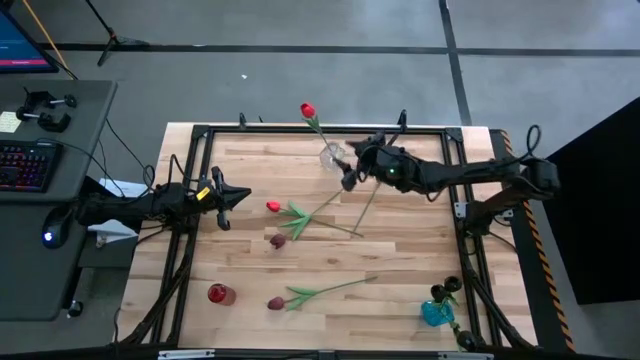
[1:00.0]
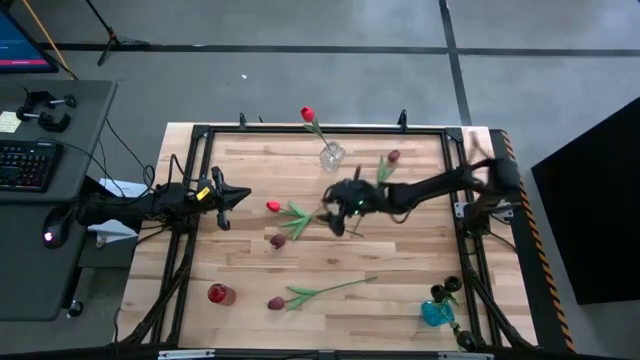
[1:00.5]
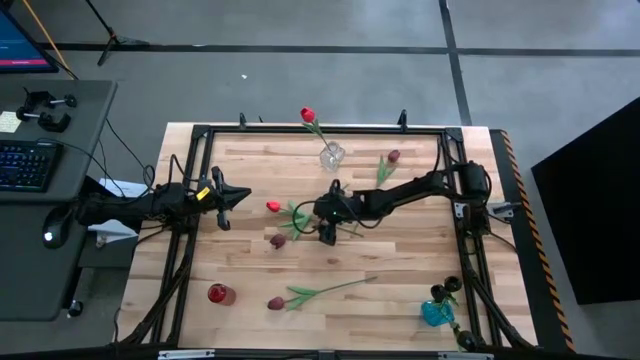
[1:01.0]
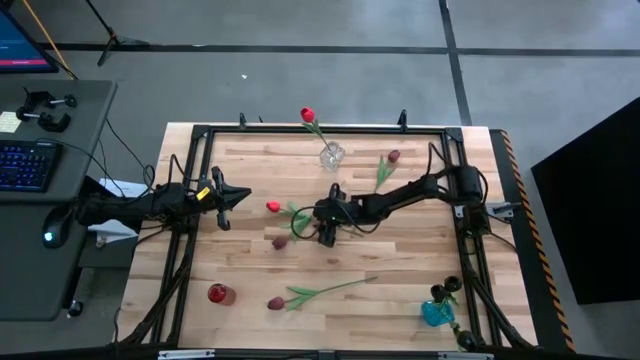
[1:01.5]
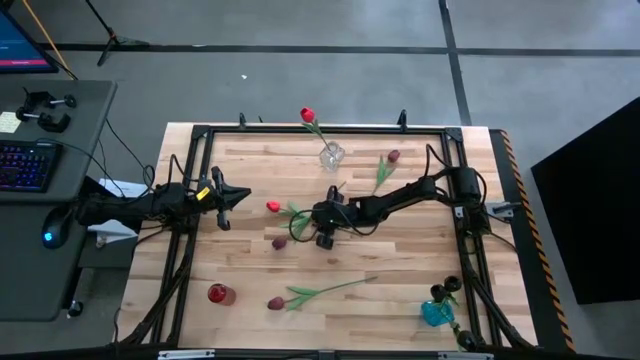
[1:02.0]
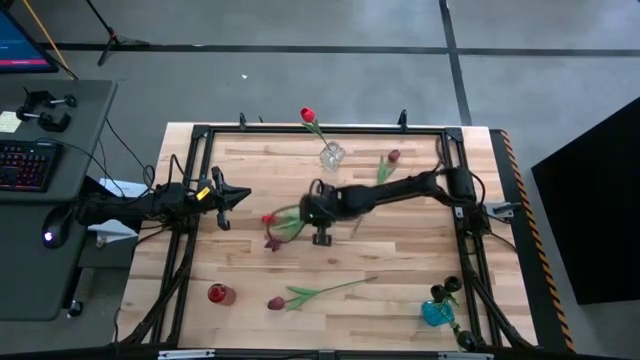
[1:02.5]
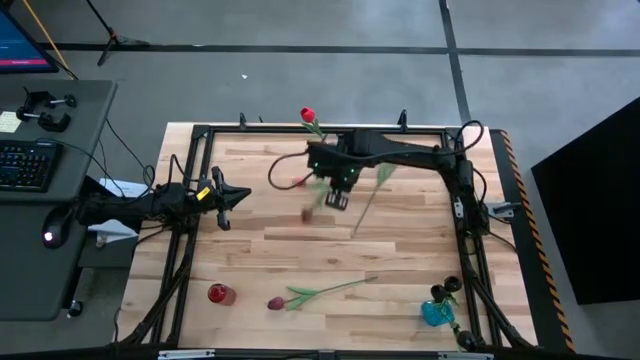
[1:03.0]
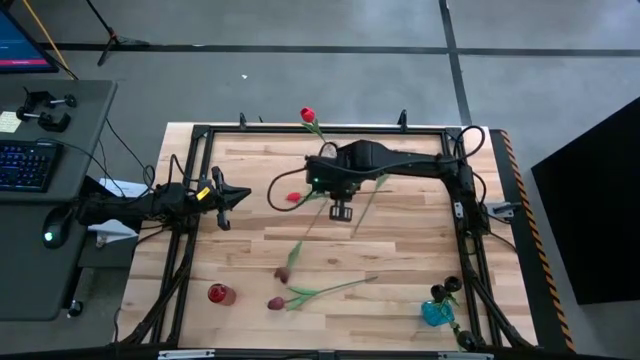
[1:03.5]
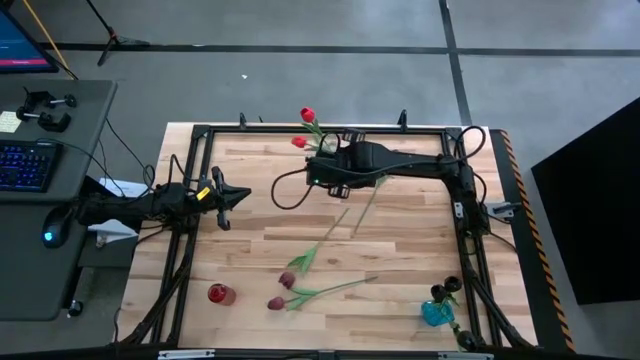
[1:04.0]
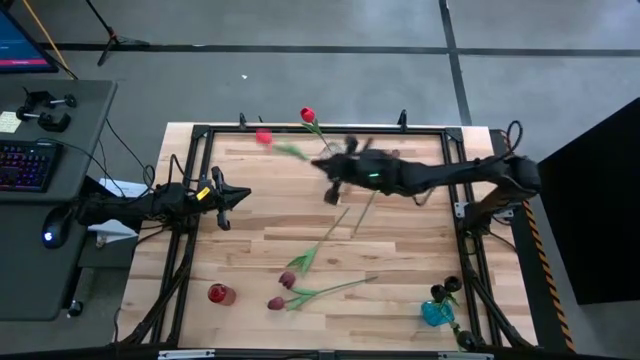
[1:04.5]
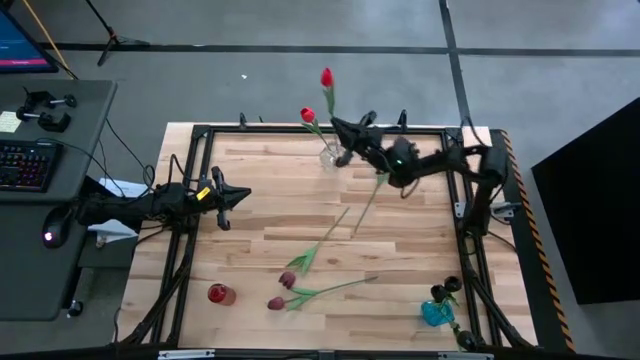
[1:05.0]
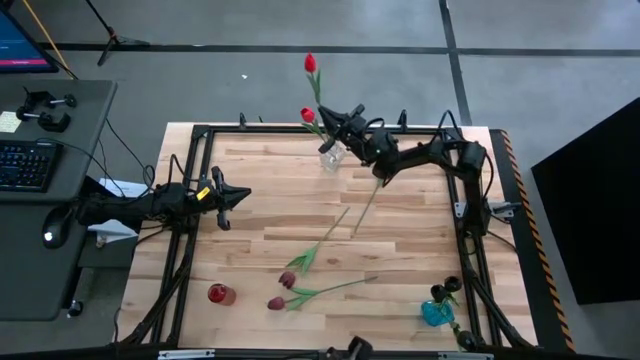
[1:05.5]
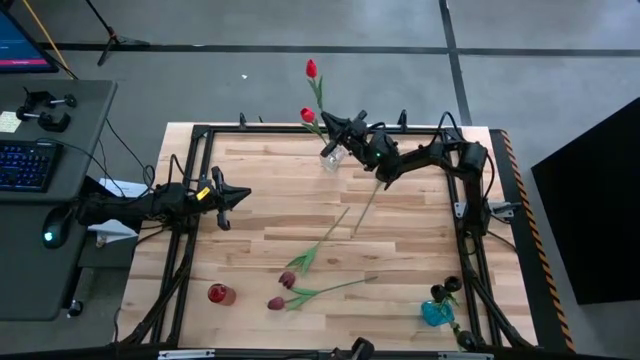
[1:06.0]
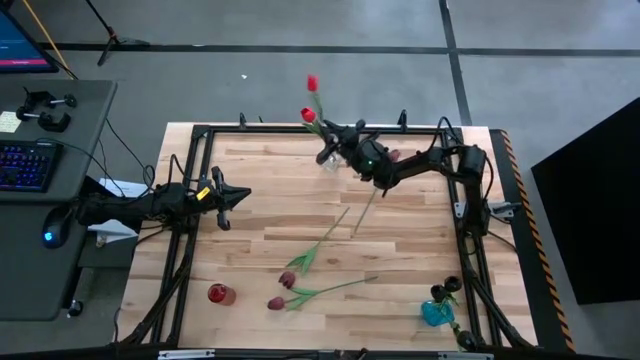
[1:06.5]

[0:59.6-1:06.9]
Task: Sort flowers into vase by color
Put the pink flower into the transparent vase

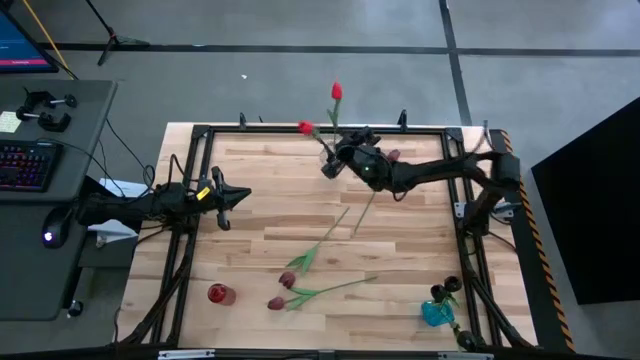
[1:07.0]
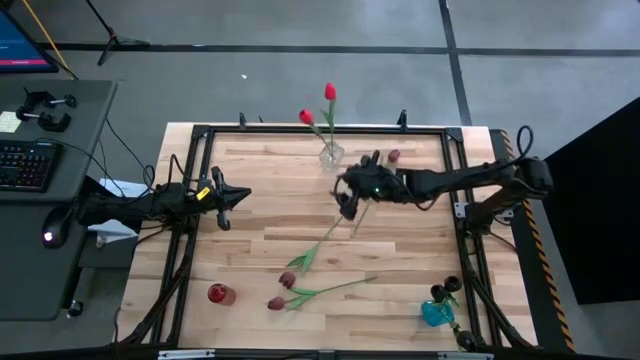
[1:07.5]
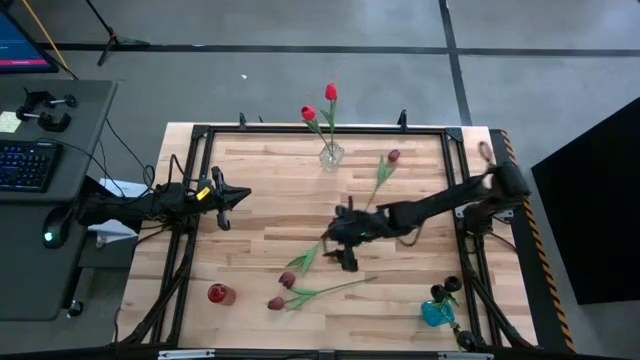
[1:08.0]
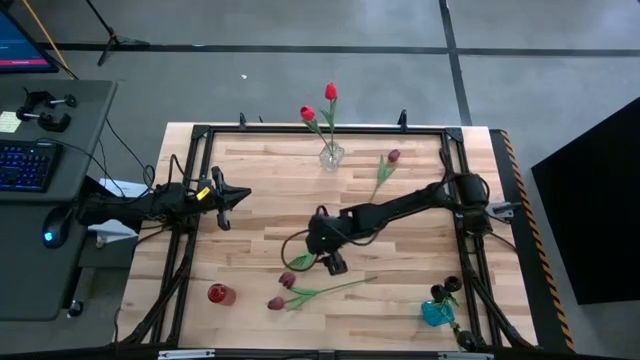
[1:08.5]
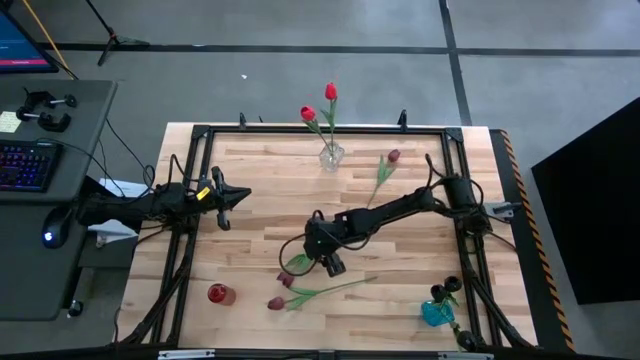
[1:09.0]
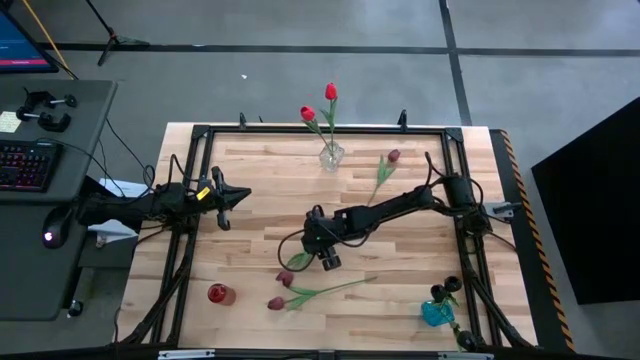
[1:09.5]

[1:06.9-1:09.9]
Put the center maroon flower into the red vase

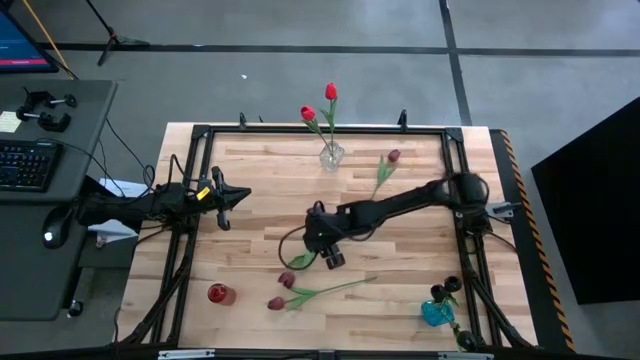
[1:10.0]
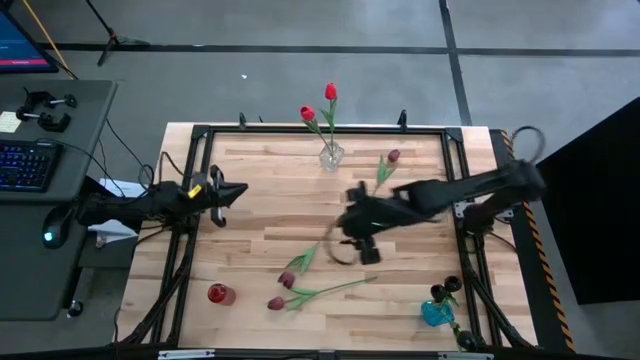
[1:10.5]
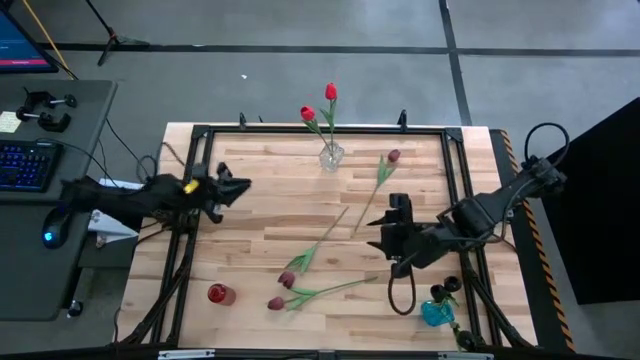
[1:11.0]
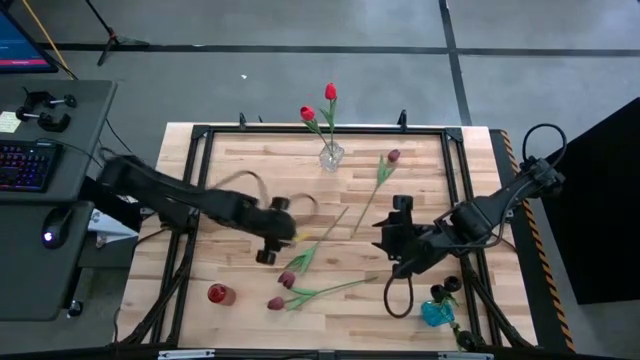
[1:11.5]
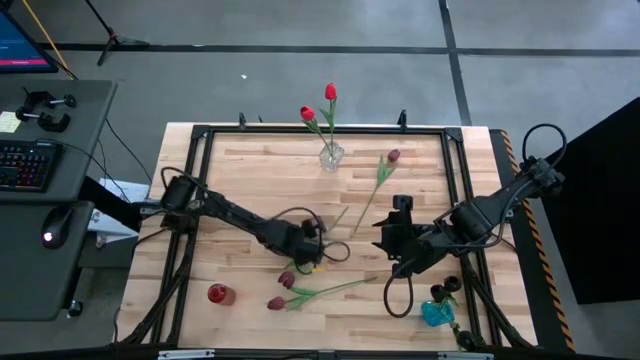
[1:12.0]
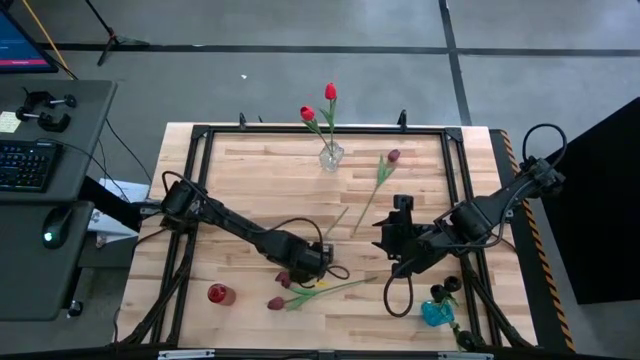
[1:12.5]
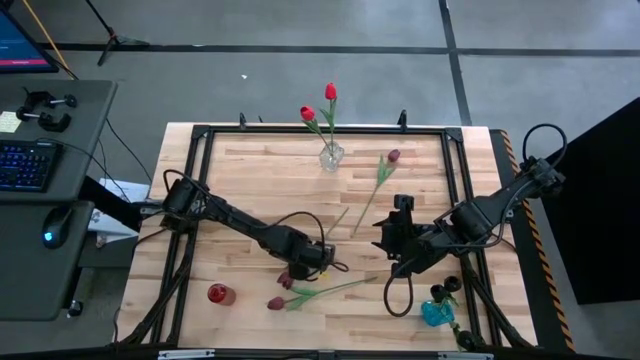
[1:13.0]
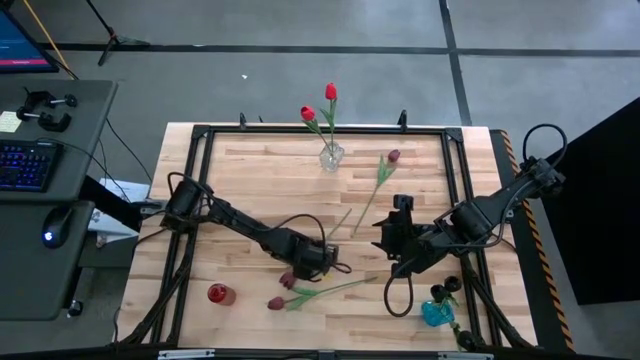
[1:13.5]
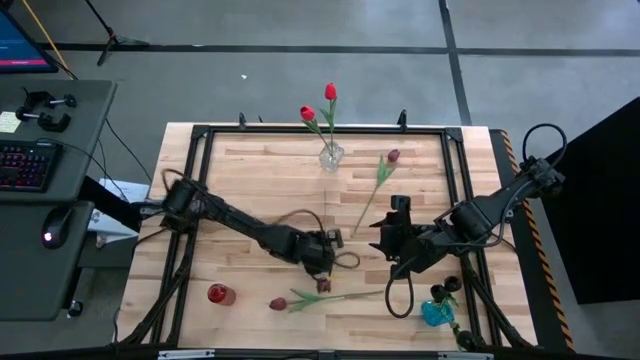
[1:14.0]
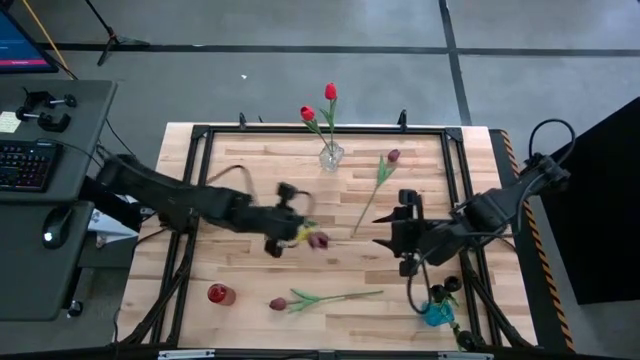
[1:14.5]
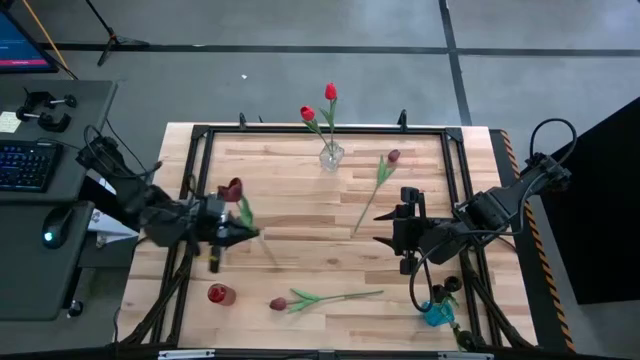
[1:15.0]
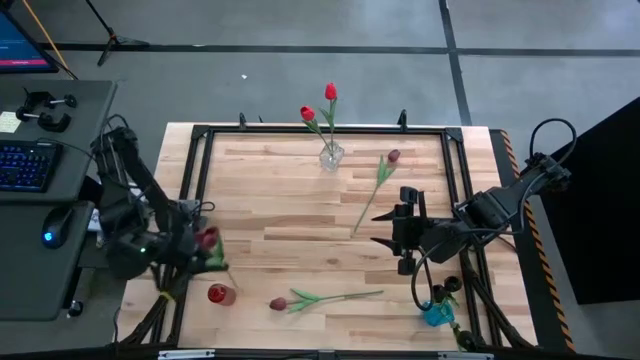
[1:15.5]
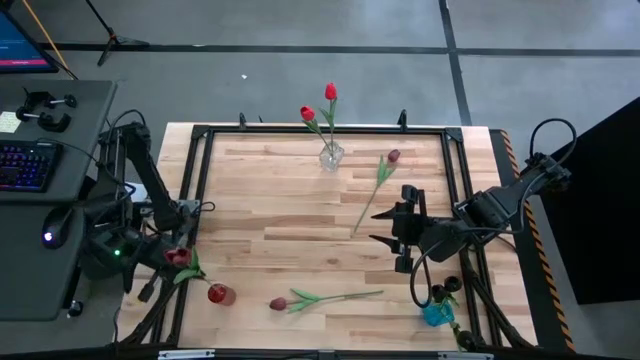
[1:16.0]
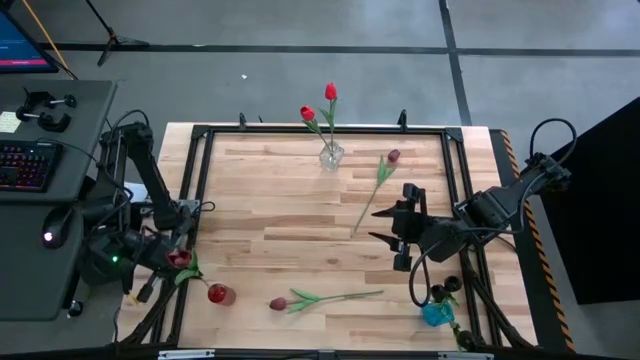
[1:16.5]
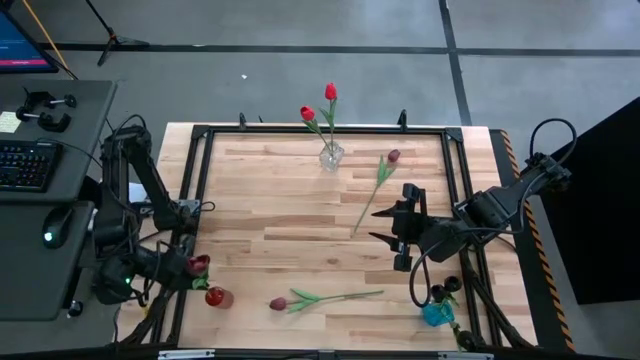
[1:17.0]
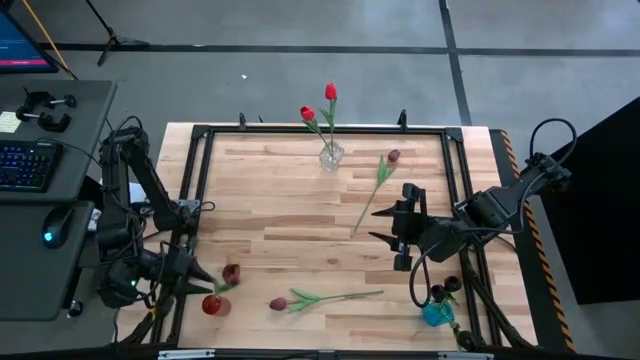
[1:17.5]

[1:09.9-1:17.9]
Put the center maroon flower into the red vase

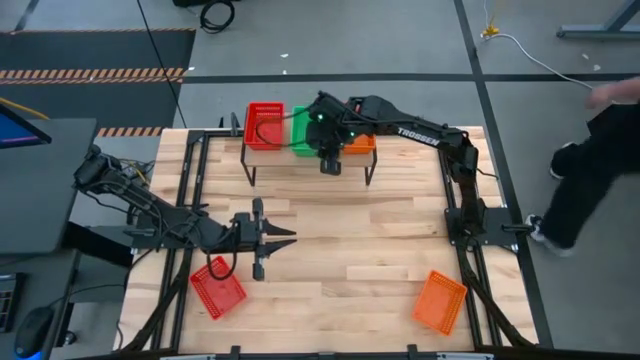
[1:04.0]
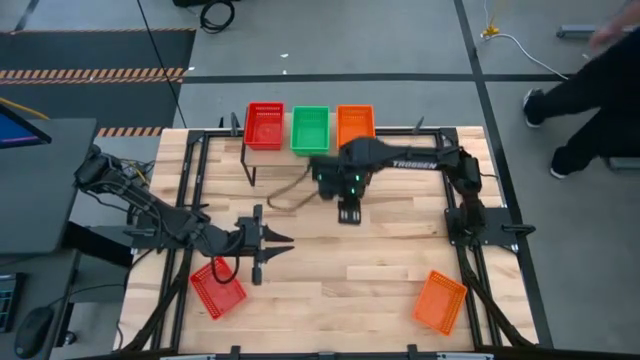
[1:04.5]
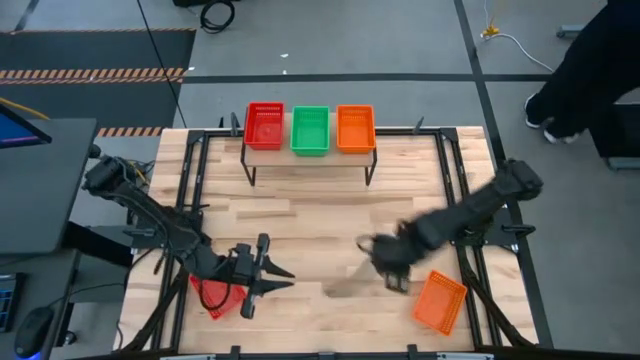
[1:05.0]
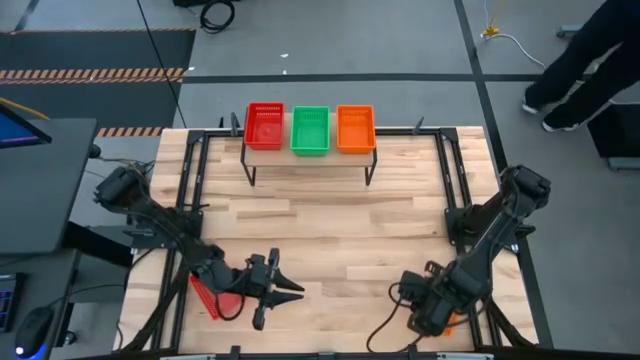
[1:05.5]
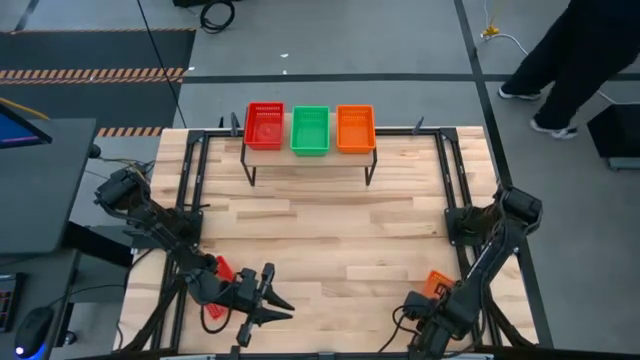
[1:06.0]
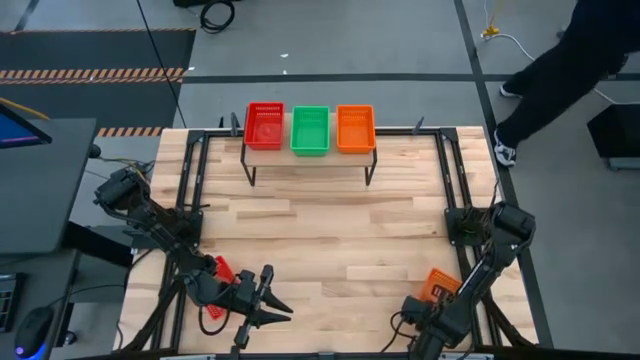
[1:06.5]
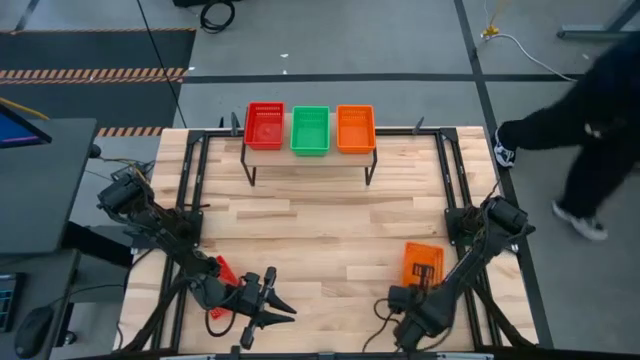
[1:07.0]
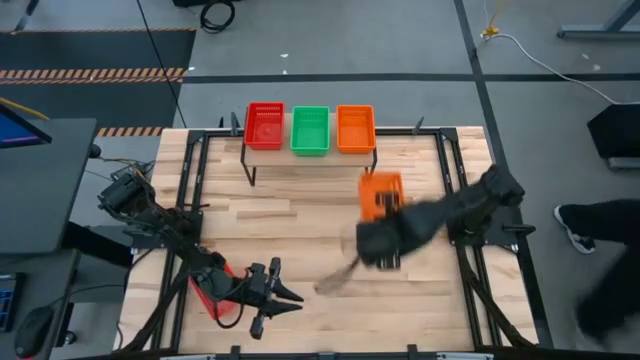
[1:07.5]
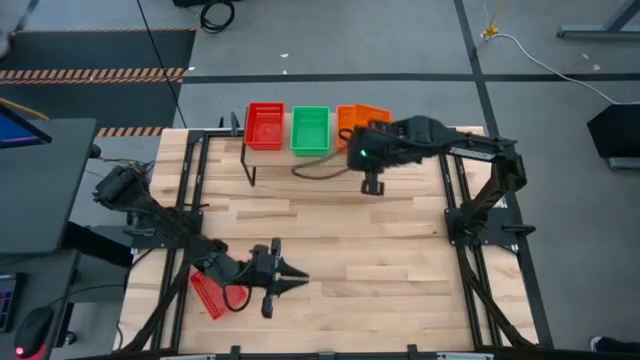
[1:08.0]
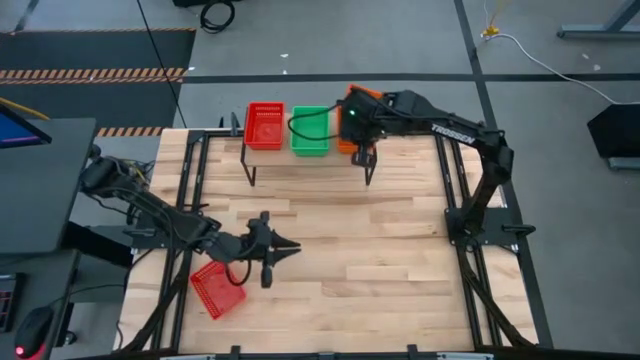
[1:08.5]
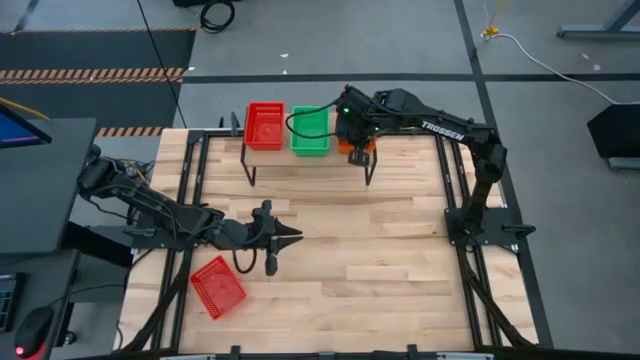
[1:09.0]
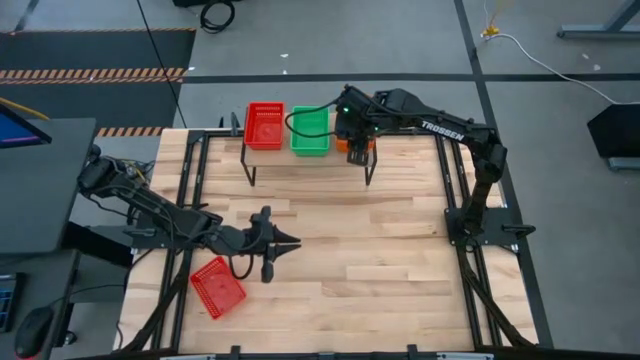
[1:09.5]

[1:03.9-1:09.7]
Task: Stack baskets on shelf by color
Stack the orange basket on top of the orange basket on the shelf
